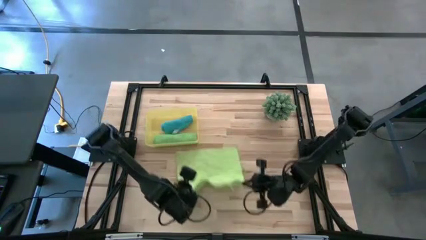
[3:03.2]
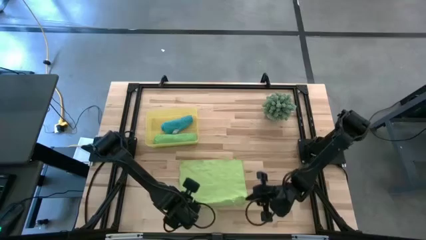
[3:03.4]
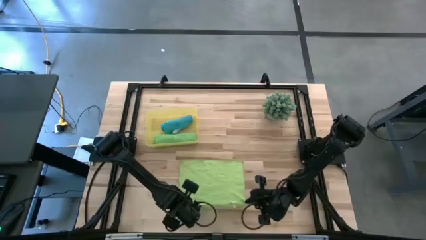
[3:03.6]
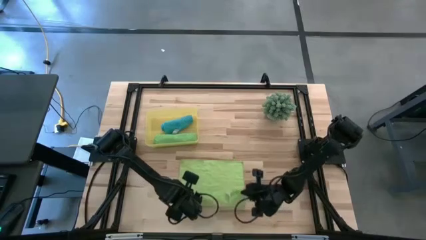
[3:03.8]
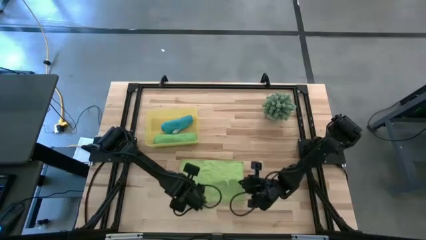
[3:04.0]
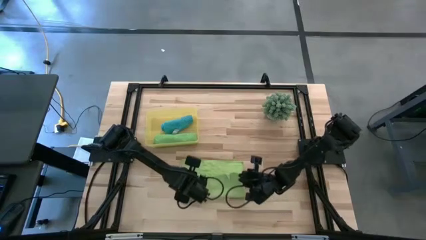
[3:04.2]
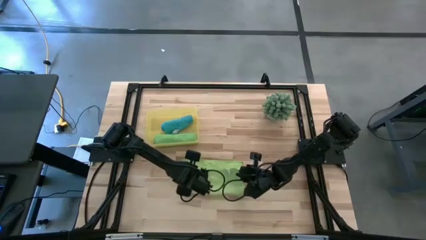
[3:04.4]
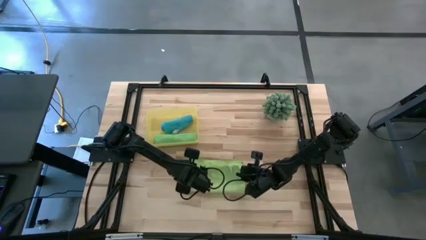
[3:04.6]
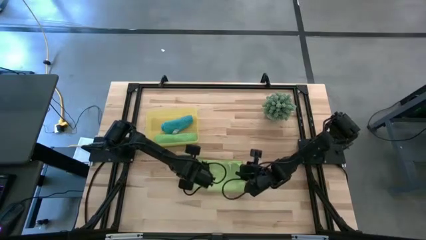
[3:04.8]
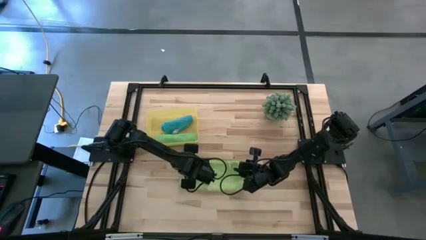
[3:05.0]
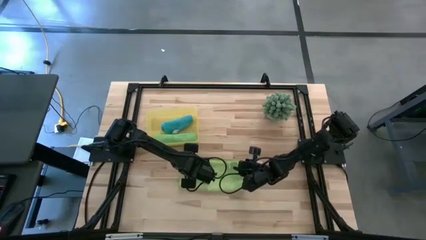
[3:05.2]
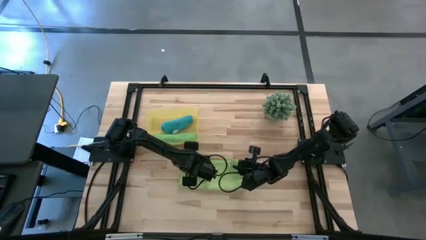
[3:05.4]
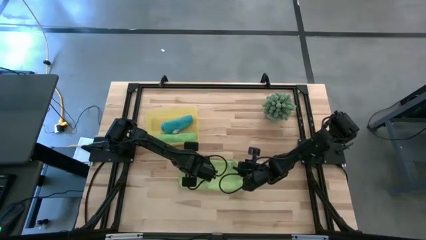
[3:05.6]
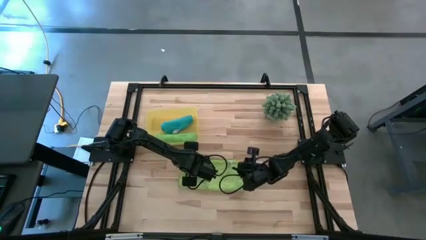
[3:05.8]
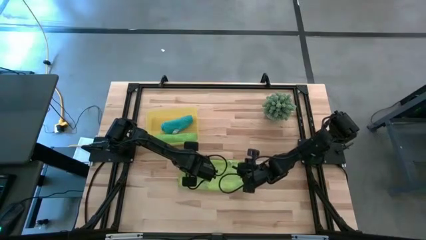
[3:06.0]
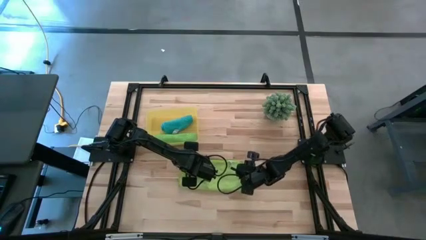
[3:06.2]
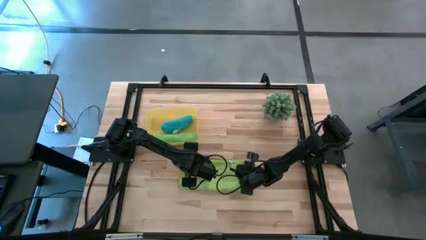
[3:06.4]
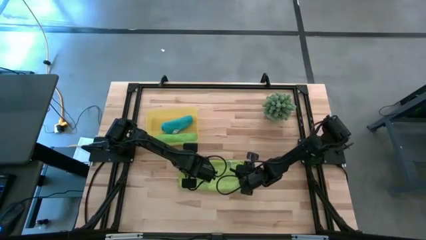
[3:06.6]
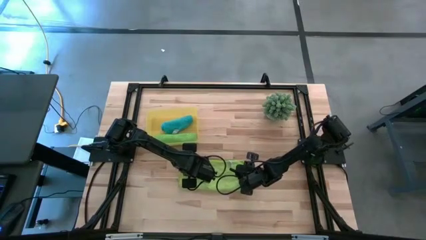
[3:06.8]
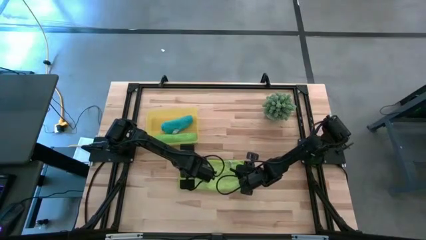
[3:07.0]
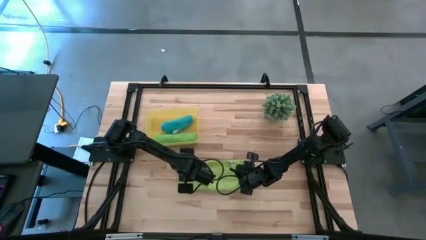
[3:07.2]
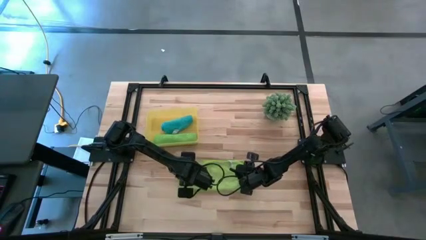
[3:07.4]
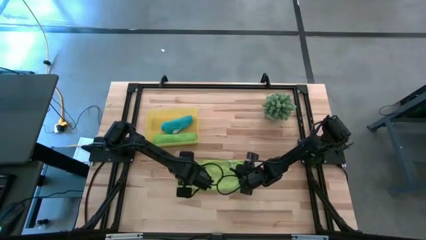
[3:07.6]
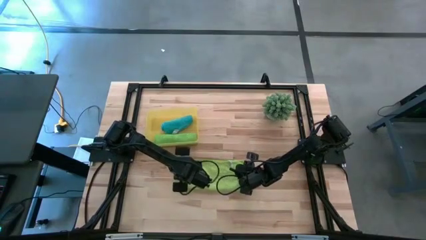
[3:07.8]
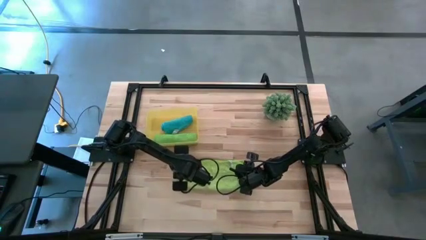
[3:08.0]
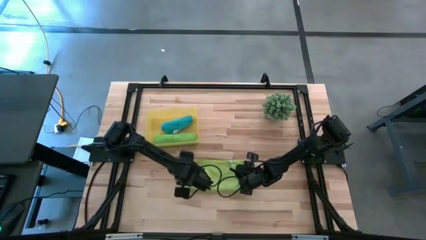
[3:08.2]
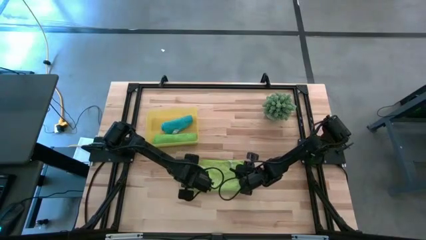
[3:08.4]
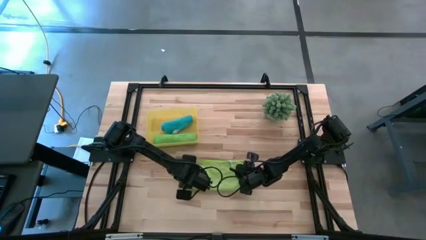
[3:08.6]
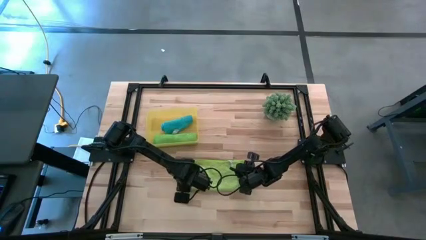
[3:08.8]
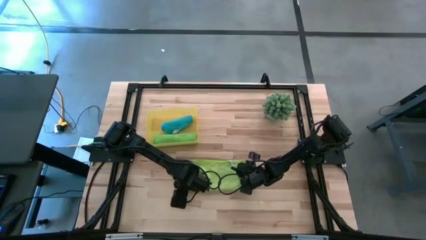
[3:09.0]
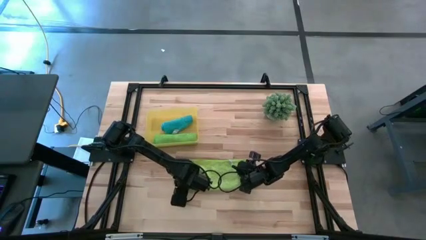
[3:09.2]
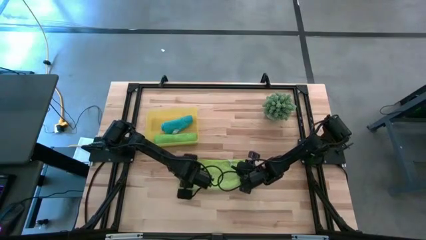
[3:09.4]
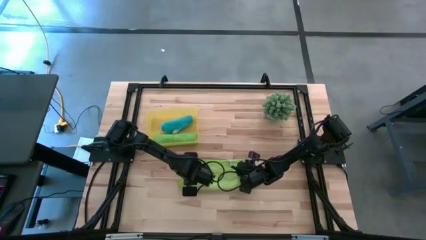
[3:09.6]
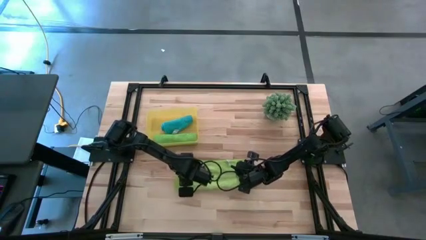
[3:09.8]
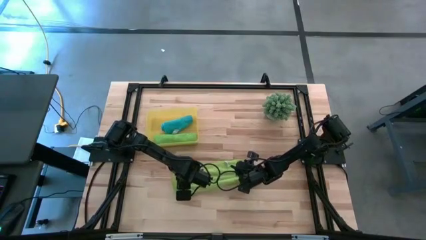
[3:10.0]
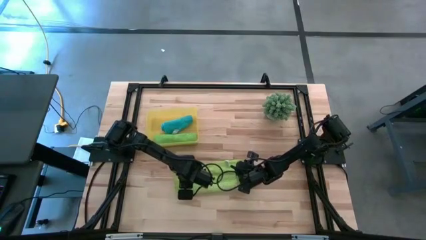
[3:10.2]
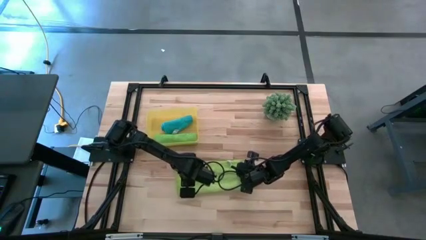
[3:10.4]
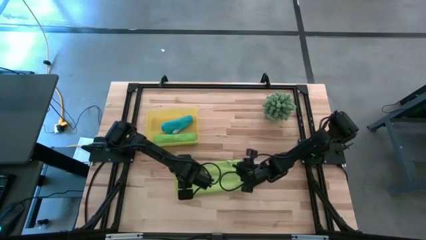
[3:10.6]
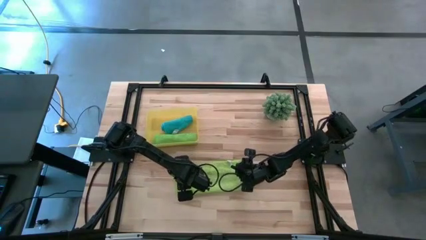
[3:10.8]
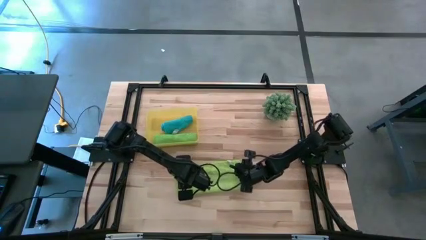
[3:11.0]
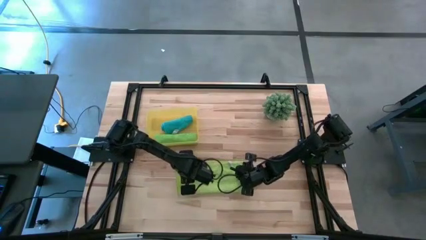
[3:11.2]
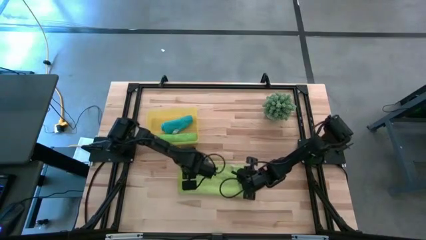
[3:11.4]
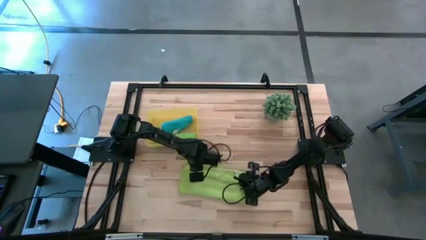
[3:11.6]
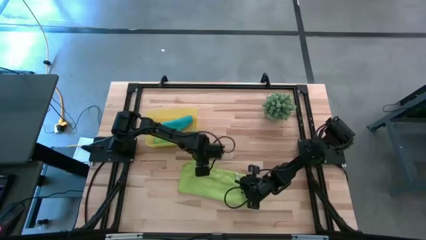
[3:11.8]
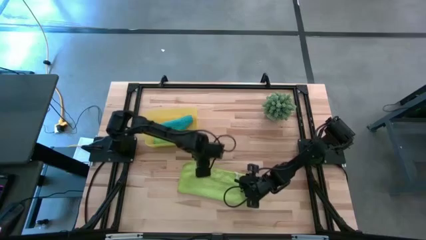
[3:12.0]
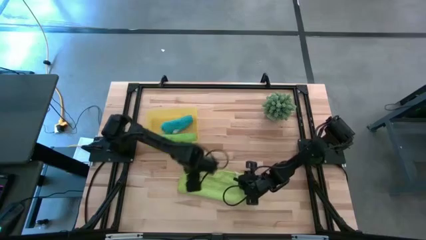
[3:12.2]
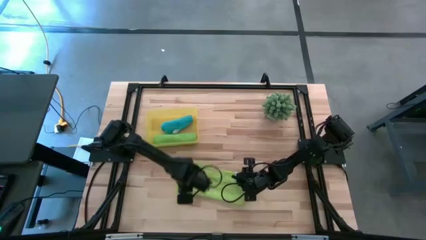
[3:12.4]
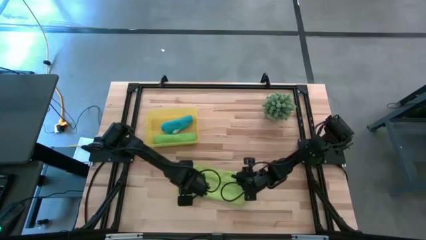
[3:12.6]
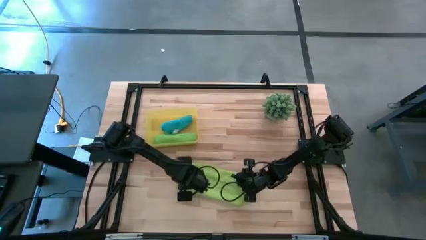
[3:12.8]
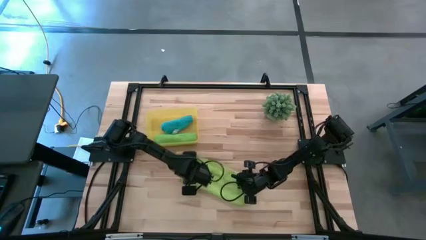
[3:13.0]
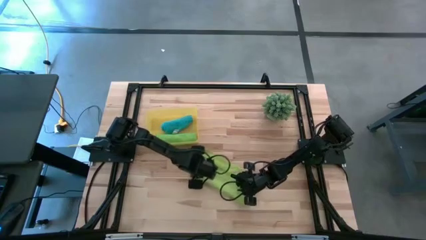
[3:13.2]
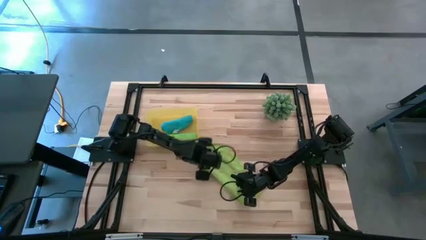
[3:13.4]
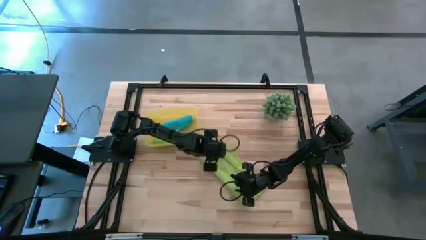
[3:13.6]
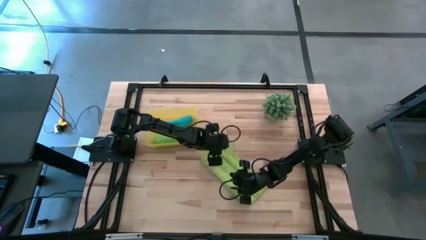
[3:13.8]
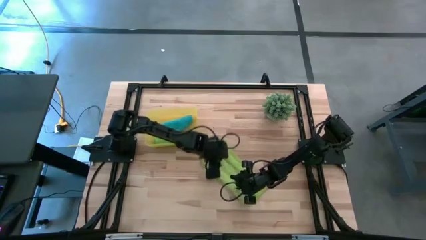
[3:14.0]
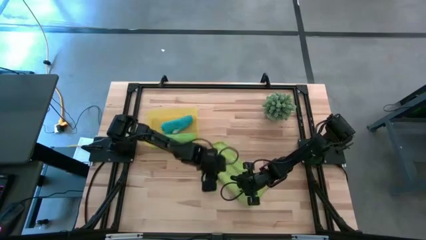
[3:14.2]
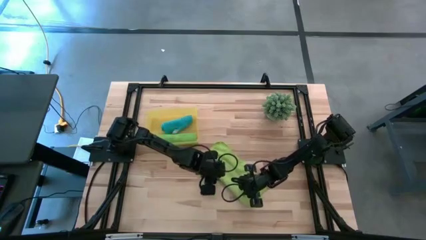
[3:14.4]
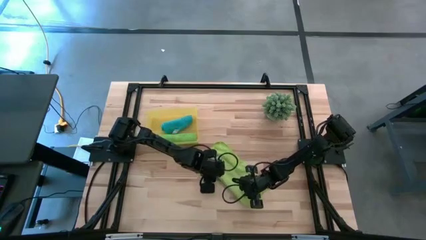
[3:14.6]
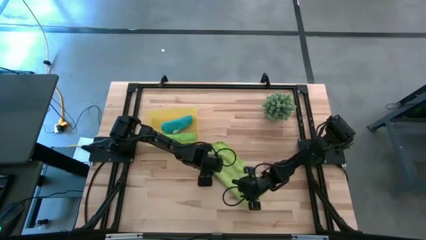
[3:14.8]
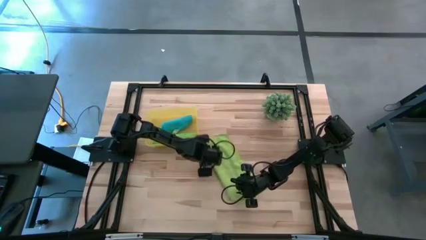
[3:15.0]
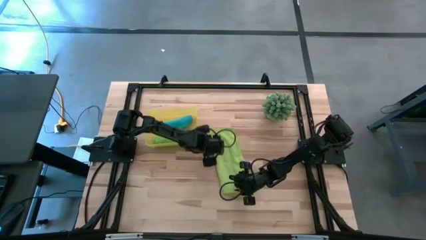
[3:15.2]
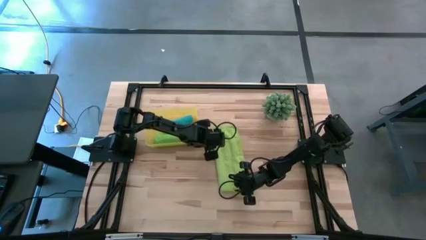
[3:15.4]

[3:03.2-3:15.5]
Task: Roll microfiber towels into tight, uniform cylinder then place into a basket
Fold the light green microfiber towel

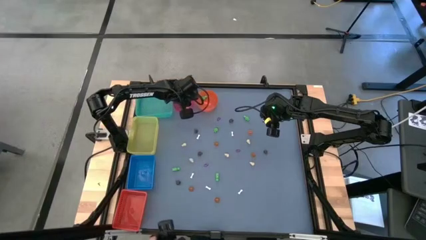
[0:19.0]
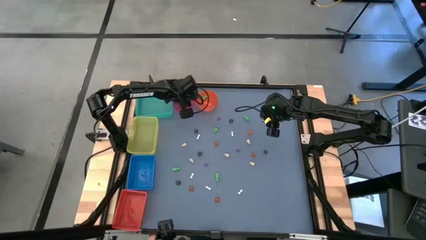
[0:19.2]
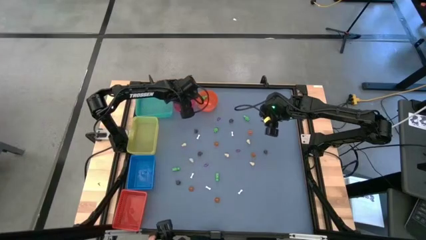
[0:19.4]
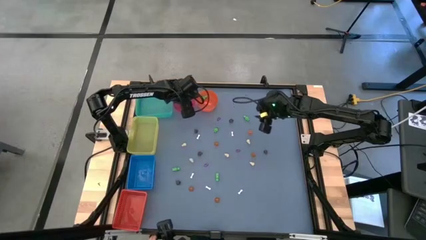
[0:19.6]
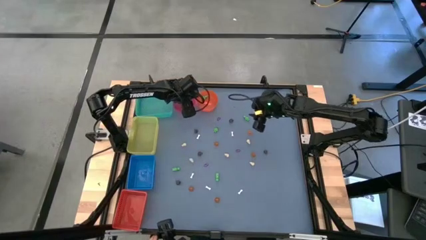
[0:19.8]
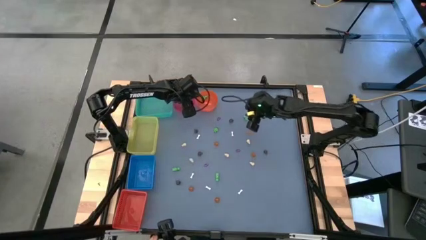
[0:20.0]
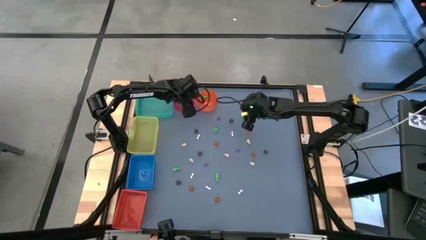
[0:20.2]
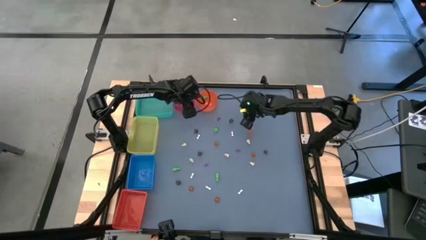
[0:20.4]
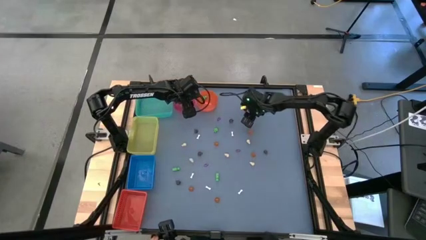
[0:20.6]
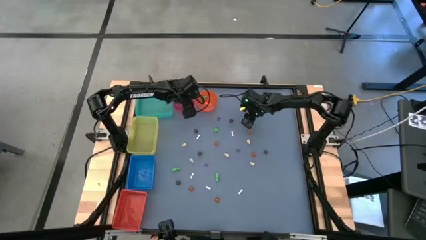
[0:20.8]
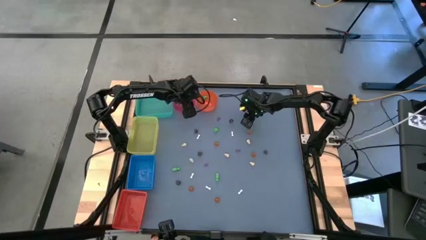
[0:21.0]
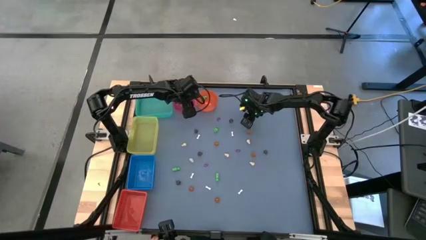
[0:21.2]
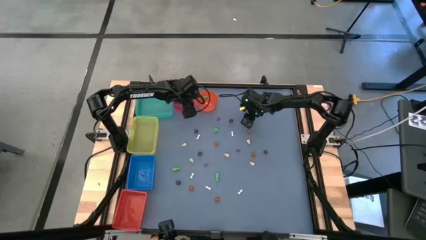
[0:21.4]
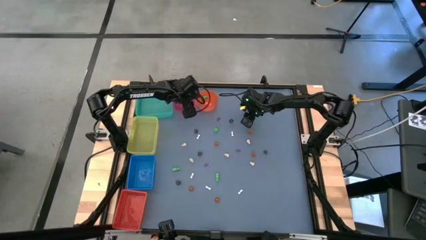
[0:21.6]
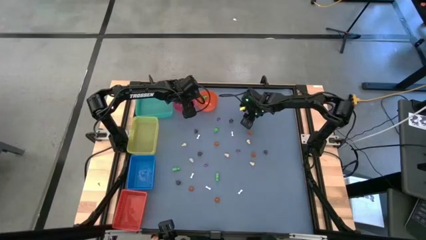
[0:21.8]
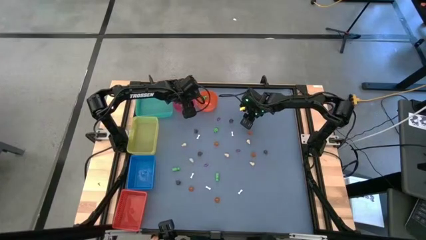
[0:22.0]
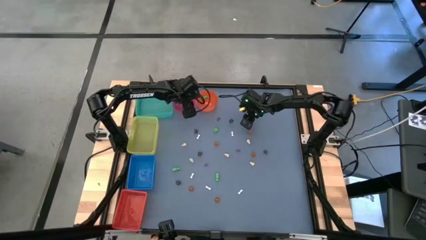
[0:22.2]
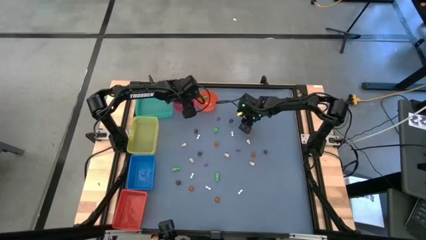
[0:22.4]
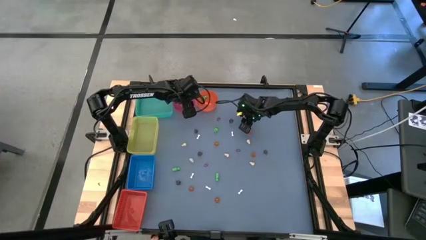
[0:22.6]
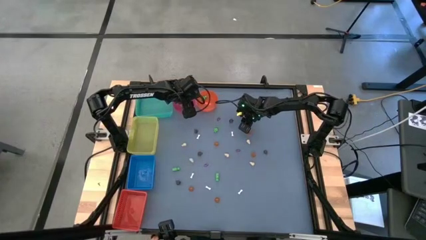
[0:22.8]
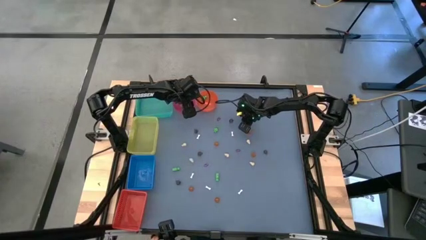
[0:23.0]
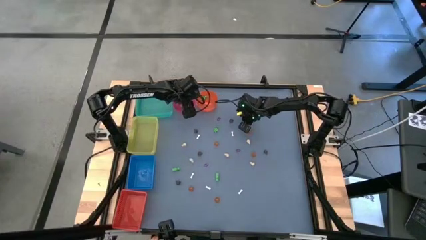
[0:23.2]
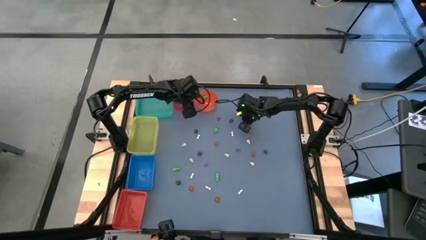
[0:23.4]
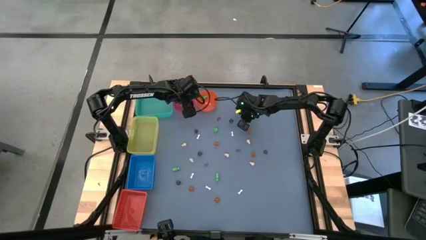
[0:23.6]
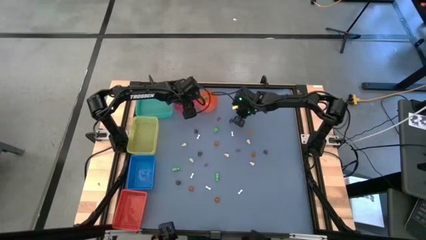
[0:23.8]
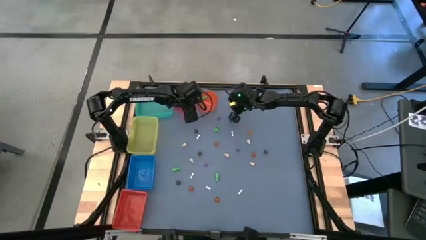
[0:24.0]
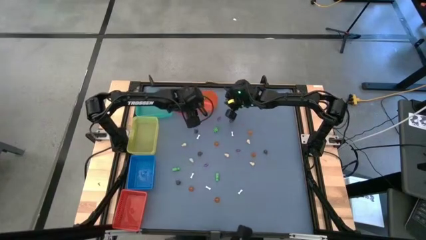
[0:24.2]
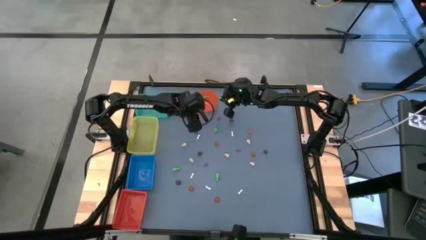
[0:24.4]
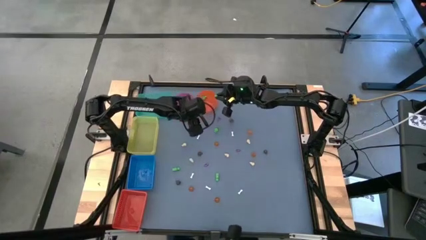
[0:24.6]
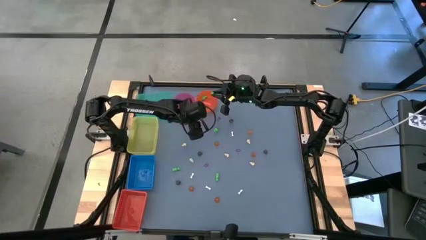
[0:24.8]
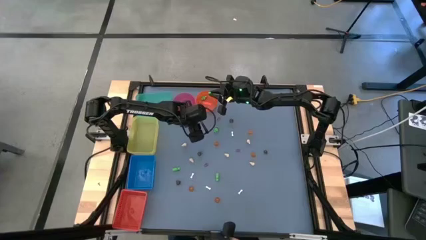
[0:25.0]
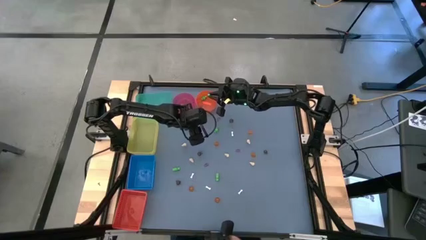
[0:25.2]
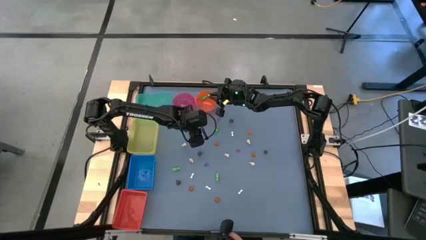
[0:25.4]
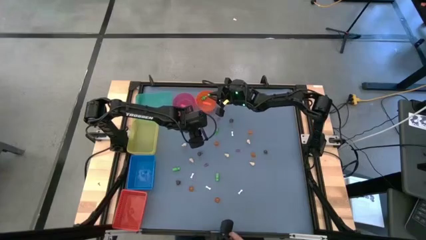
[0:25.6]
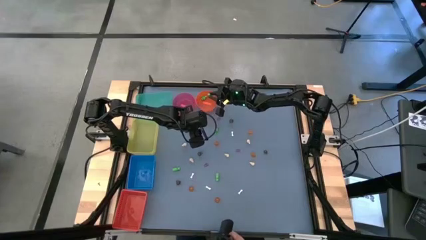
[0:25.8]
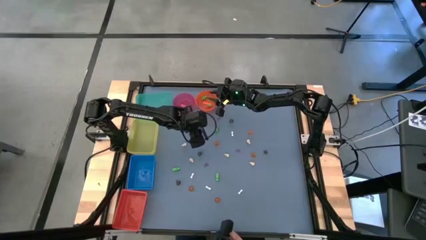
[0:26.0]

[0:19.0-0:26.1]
Task: Sort Halloween decoration
Put the green skeleton toy into the orange bin
